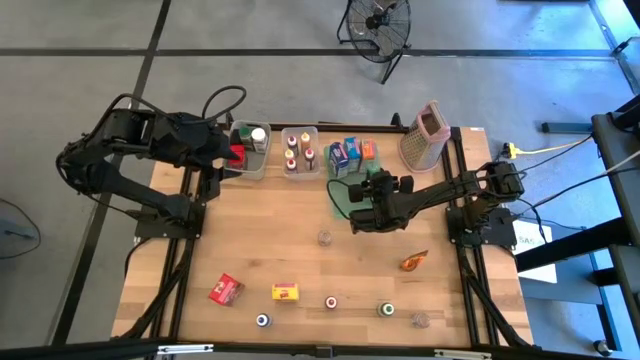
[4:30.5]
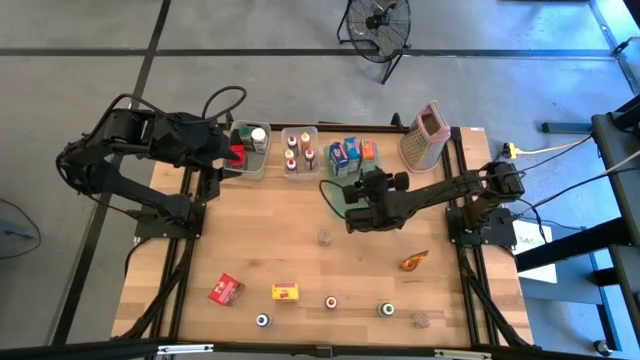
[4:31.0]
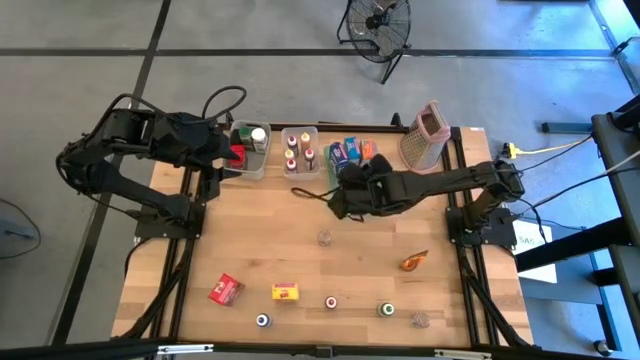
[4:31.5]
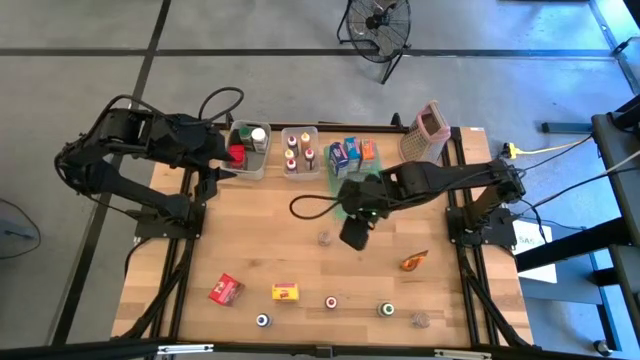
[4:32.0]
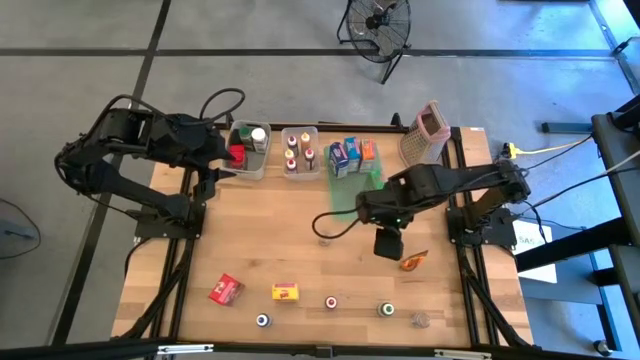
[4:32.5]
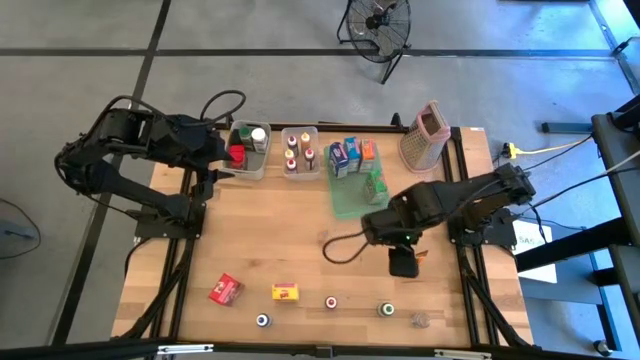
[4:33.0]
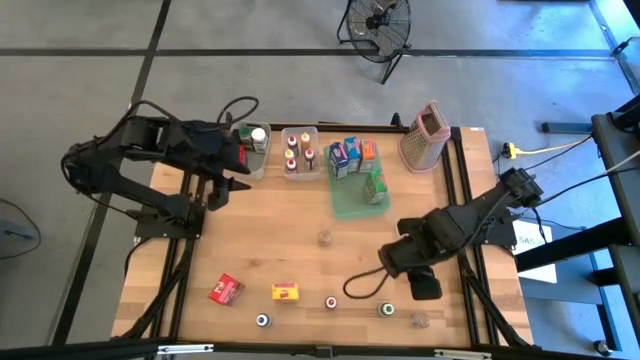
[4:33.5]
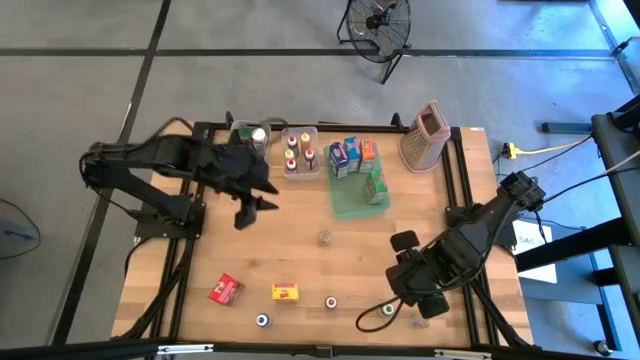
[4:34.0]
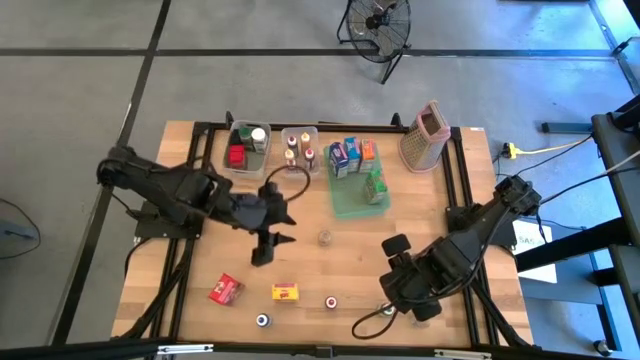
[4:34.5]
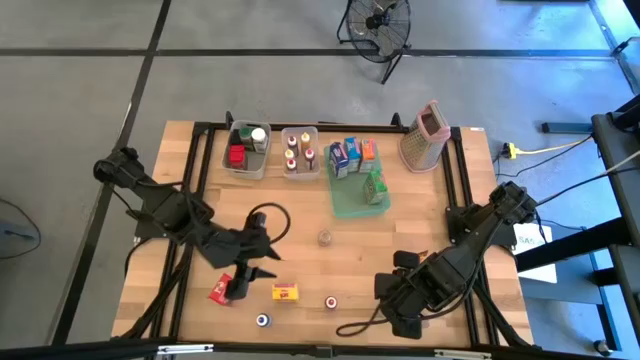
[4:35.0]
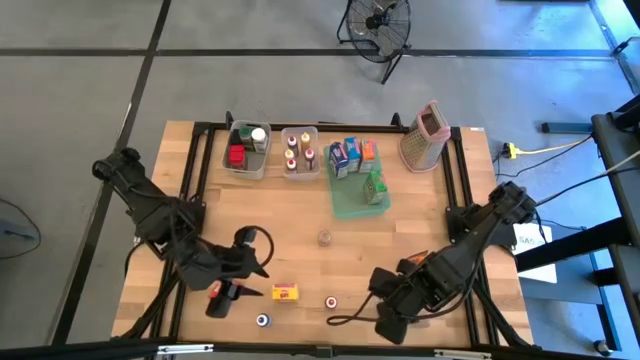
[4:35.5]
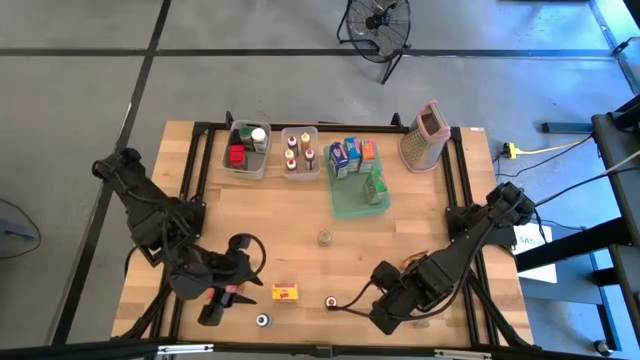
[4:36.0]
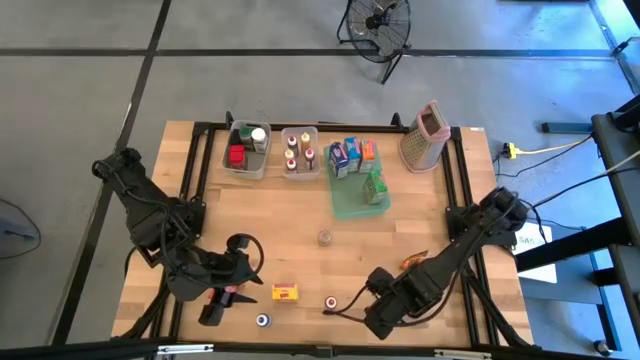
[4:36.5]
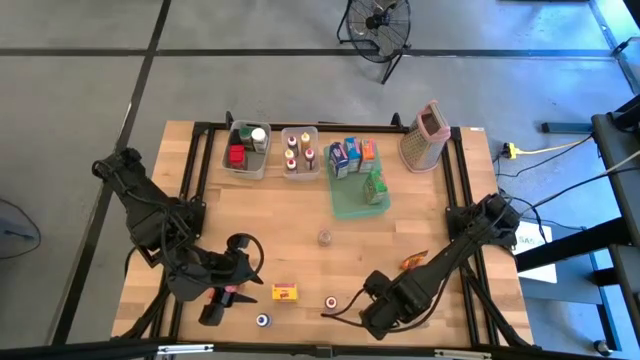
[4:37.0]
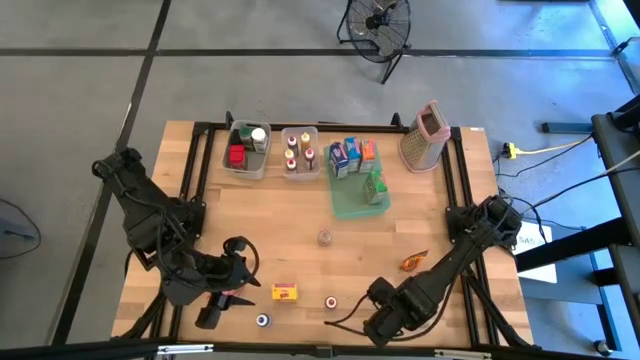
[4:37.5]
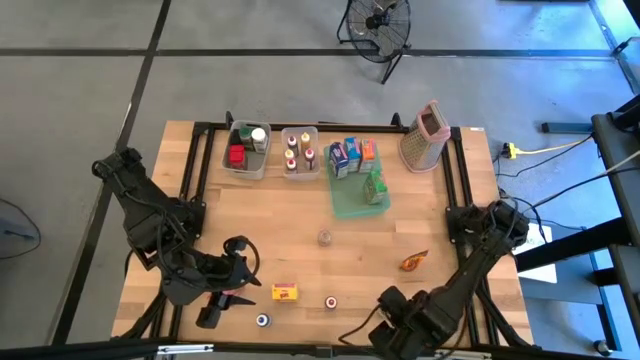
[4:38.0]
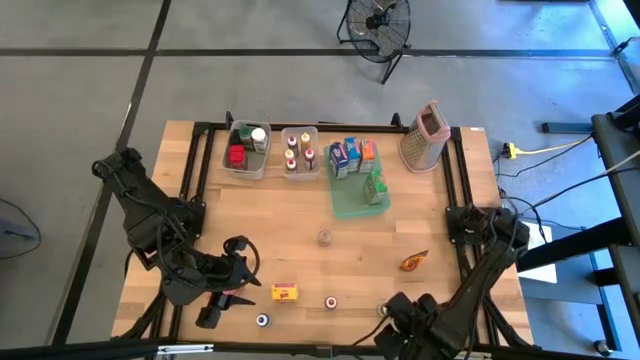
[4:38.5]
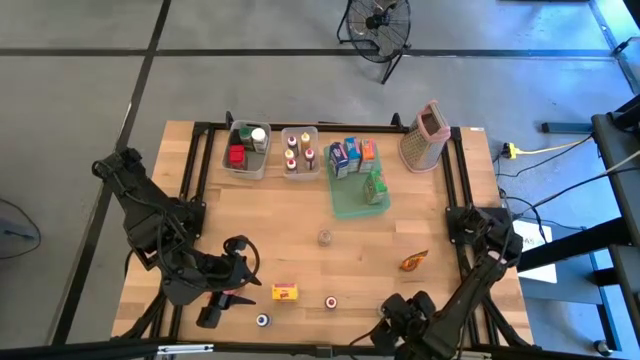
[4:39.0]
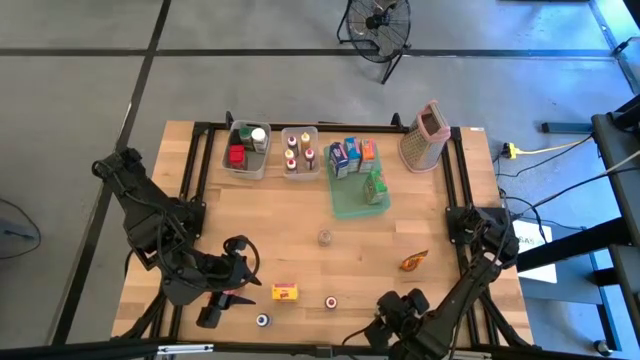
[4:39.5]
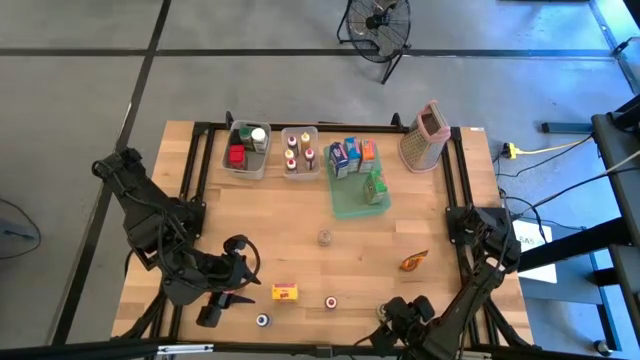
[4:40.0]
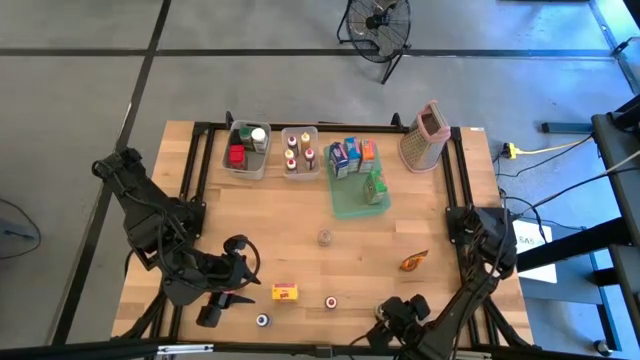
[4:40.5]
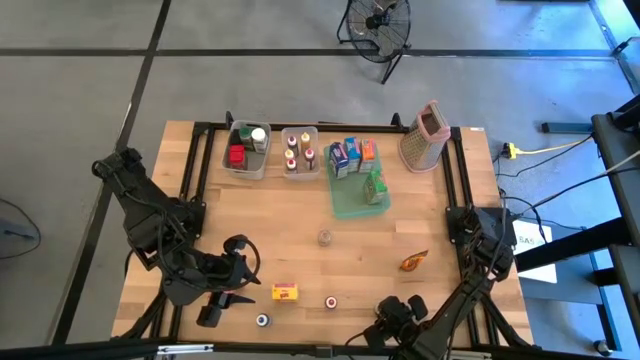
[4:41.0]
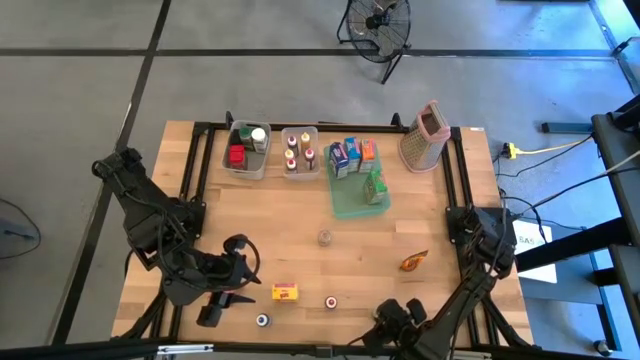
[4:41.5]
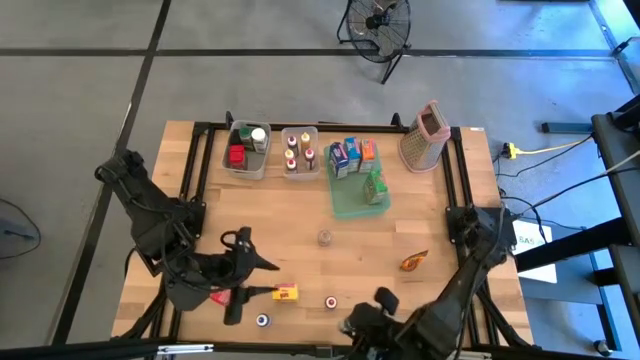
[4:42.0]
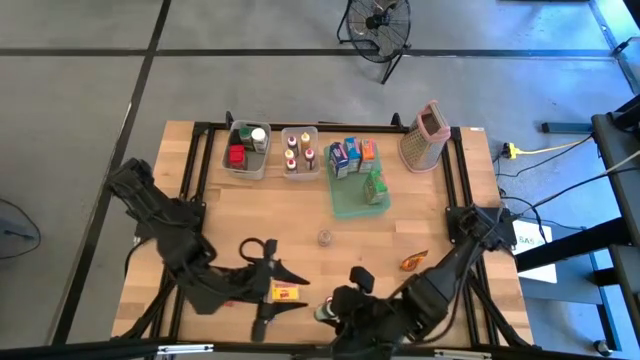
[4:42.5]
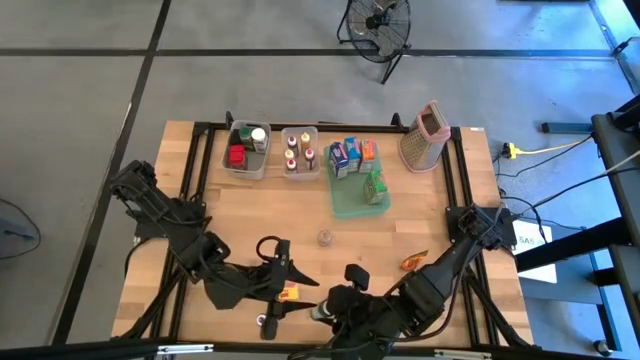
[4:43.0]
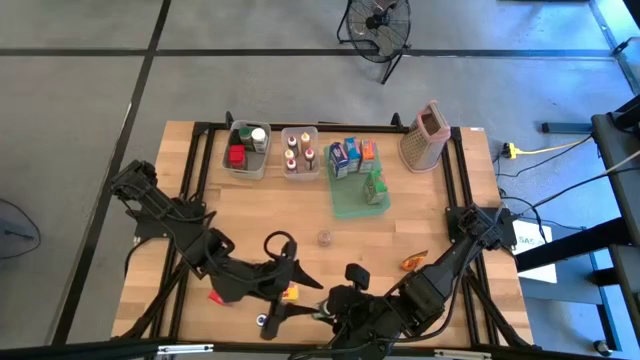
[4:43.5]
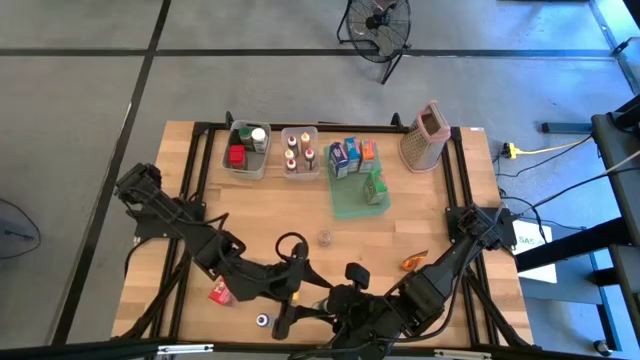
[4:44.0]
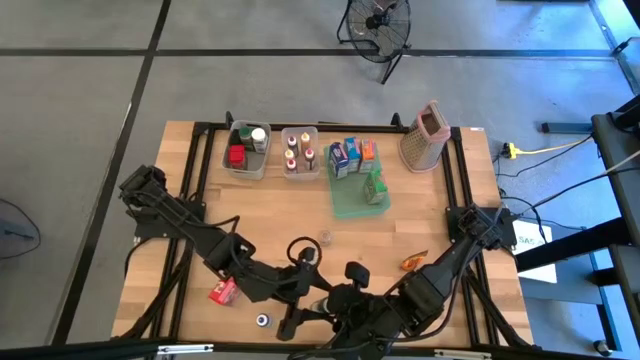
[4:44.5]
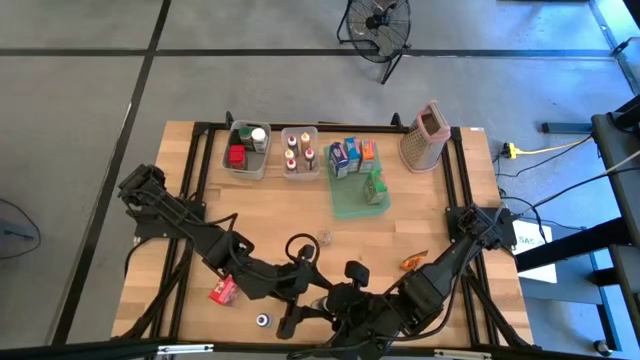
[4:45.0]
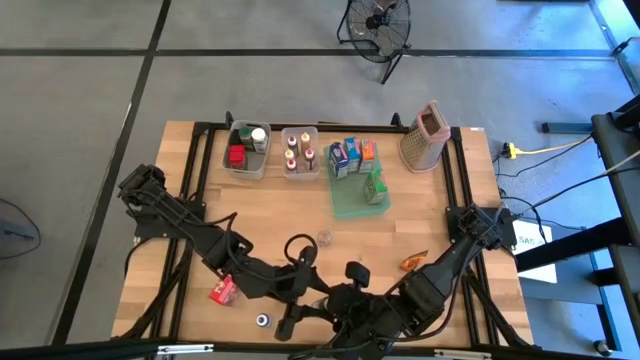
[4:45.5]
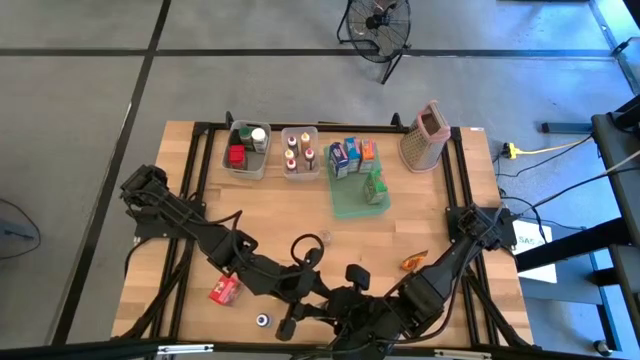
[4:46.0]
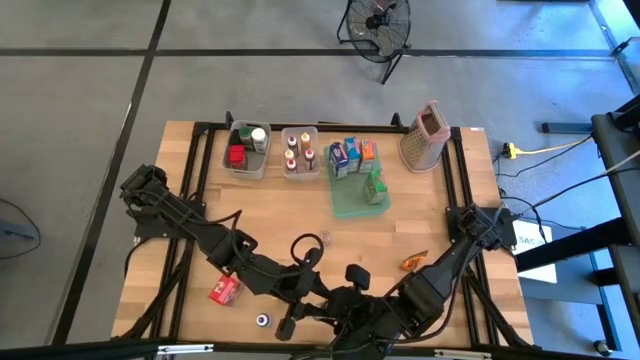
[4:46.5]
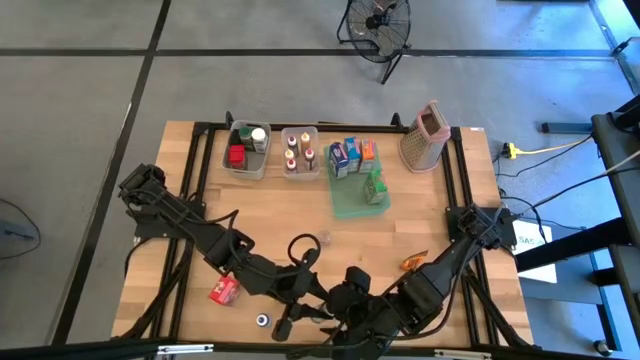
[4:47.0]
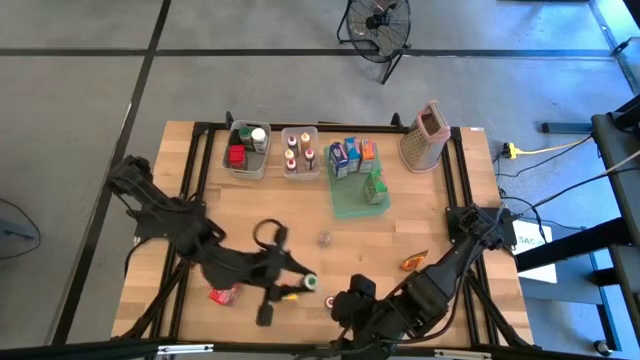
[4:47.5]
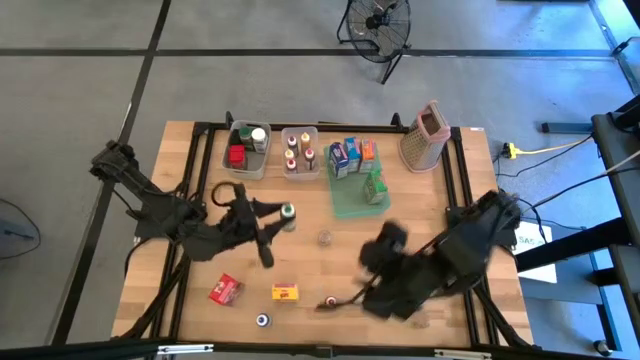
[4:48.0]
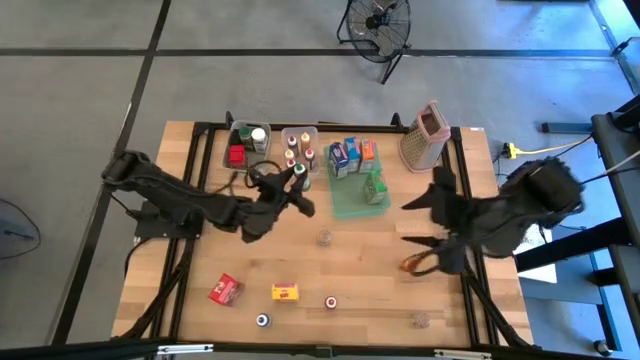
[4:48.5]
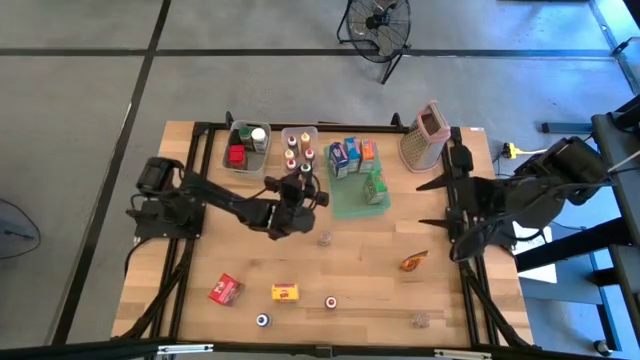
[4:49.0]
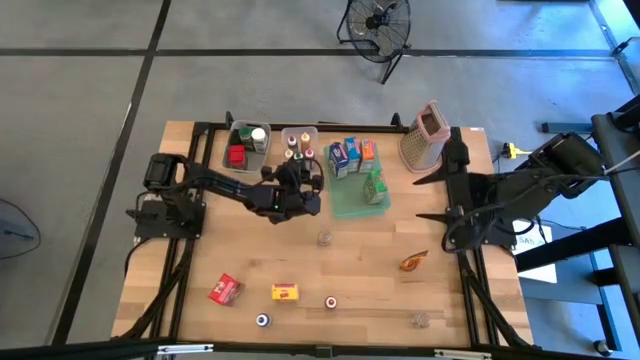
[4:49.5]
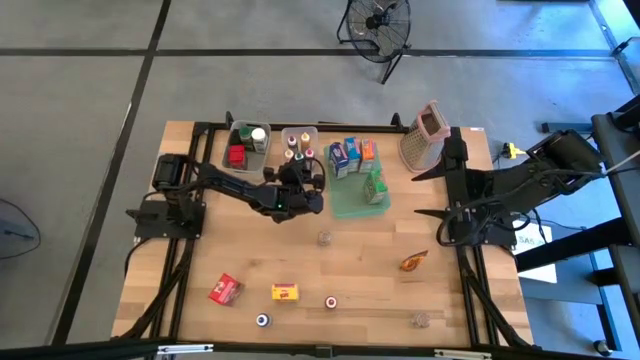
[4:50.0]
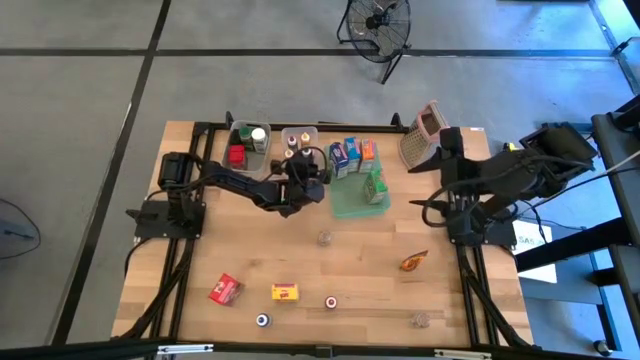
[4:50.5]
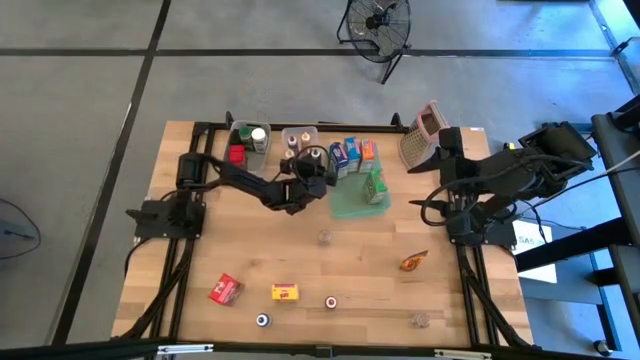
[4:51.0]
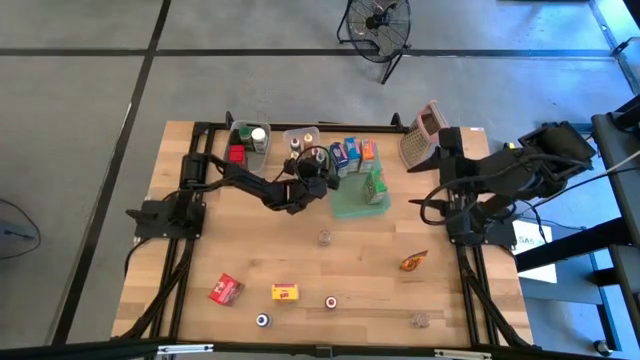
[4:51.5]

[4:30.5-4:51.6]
Task: Pick & Place Kitchen Items
Put the green food coloring bottle into the transparent bin
